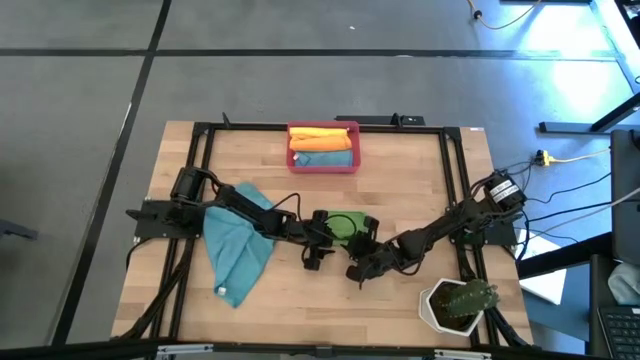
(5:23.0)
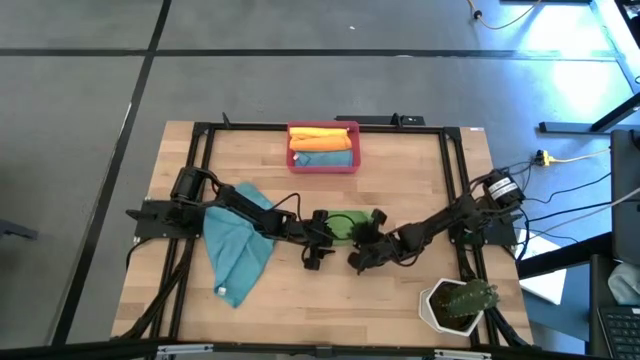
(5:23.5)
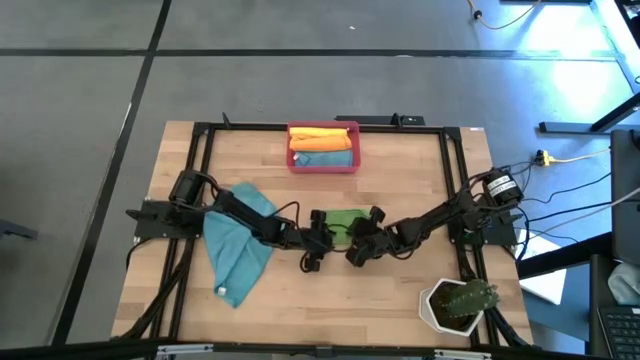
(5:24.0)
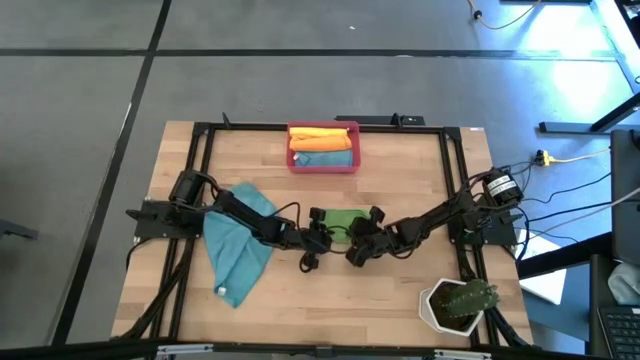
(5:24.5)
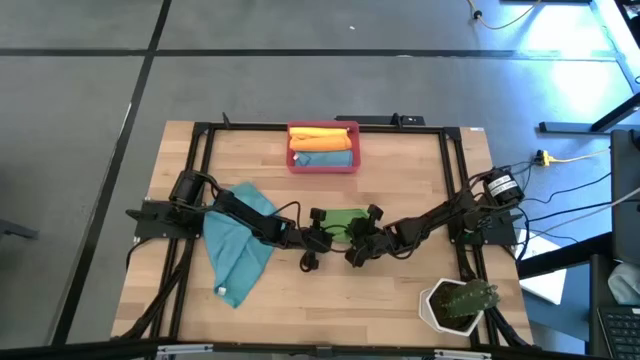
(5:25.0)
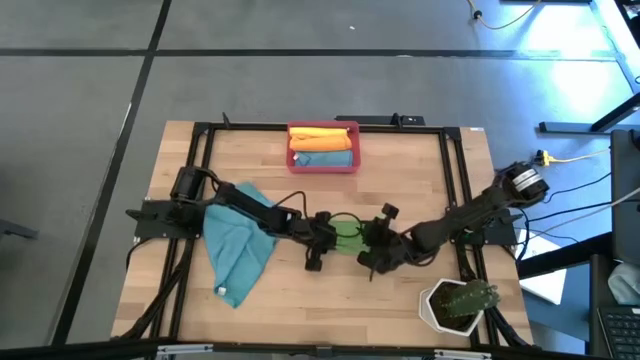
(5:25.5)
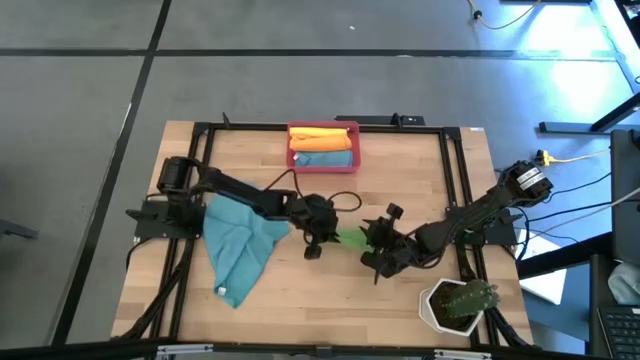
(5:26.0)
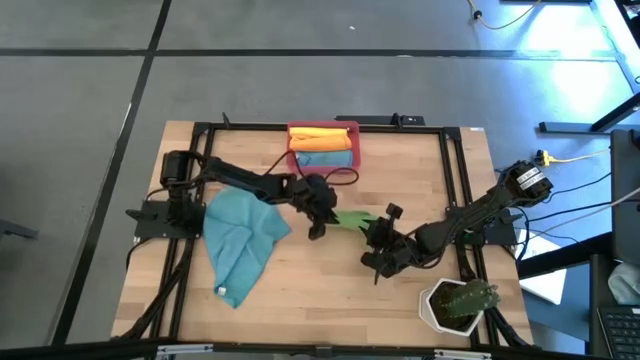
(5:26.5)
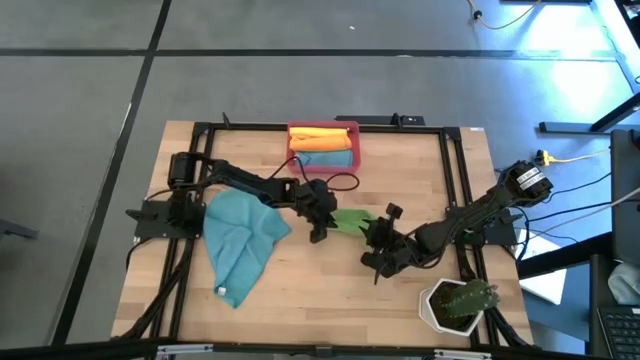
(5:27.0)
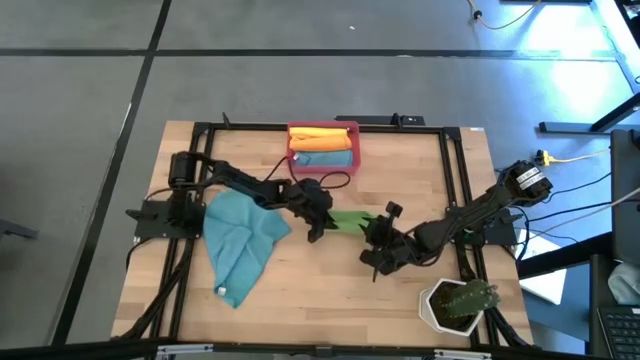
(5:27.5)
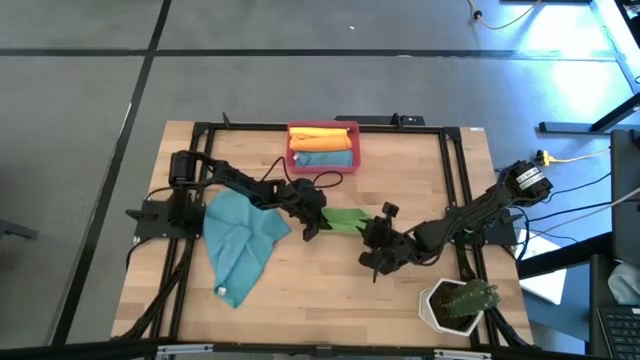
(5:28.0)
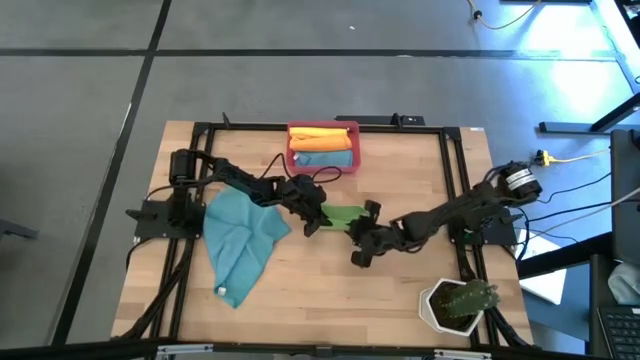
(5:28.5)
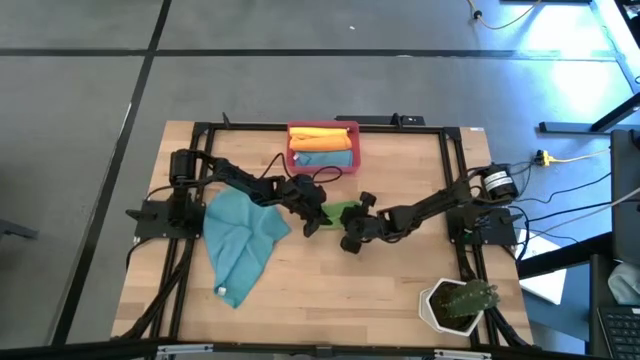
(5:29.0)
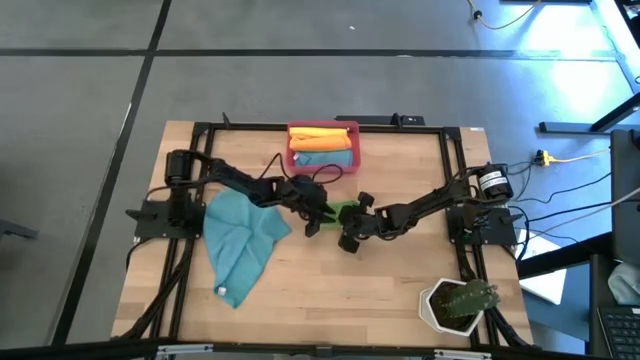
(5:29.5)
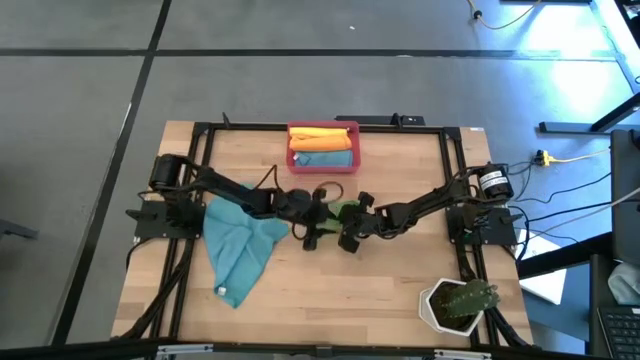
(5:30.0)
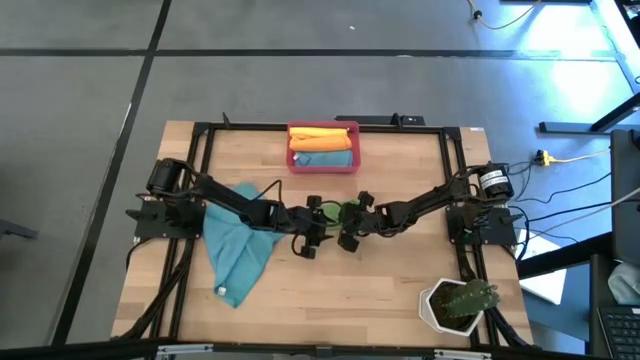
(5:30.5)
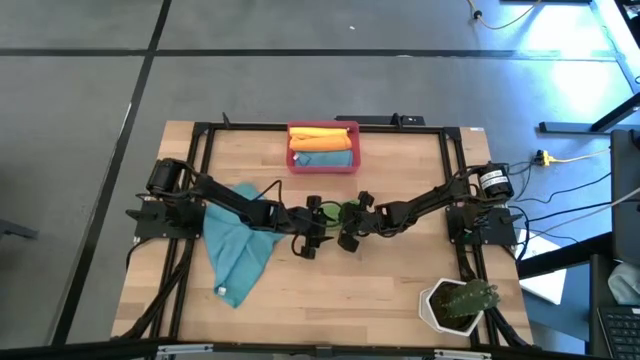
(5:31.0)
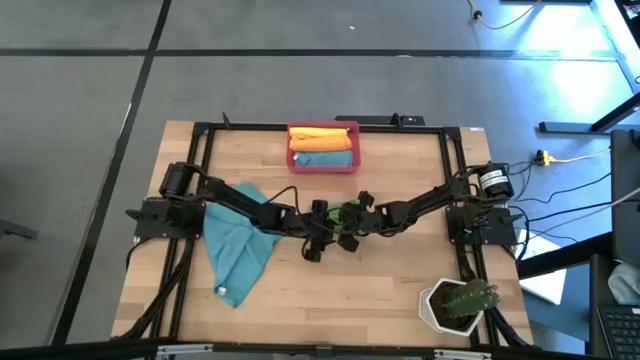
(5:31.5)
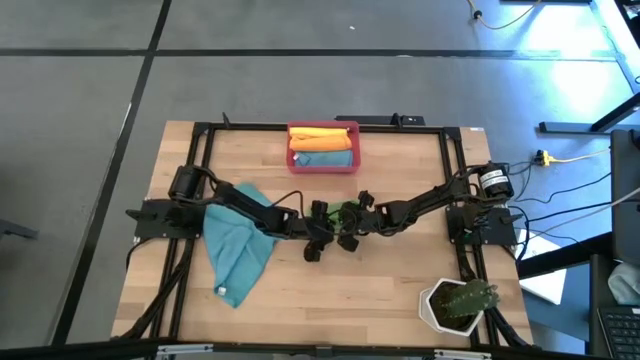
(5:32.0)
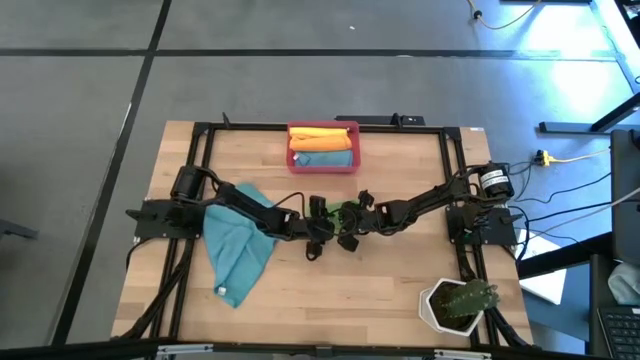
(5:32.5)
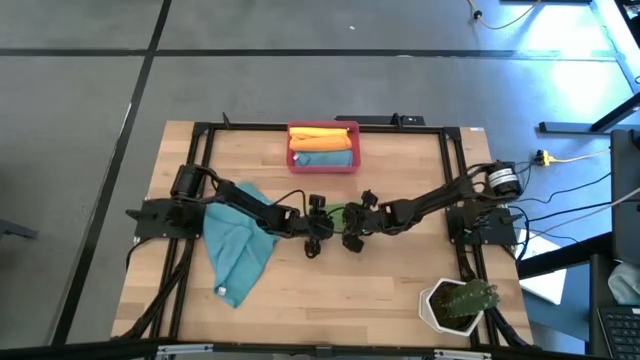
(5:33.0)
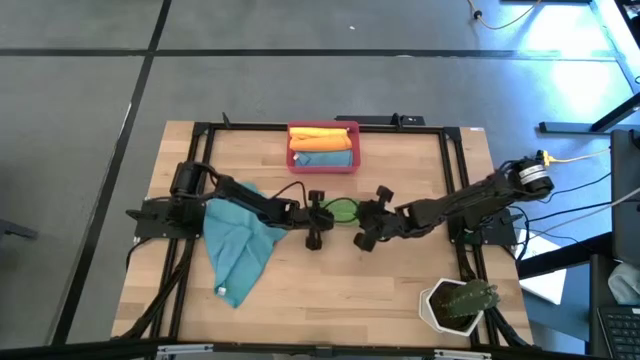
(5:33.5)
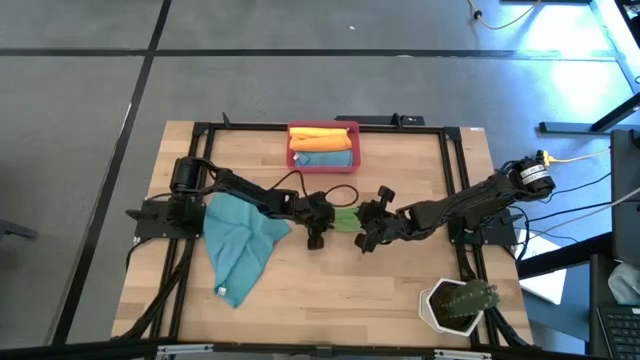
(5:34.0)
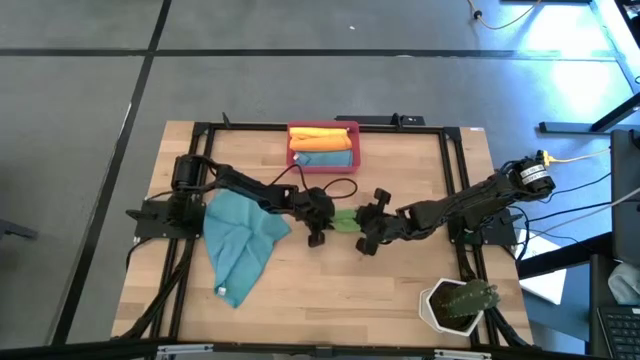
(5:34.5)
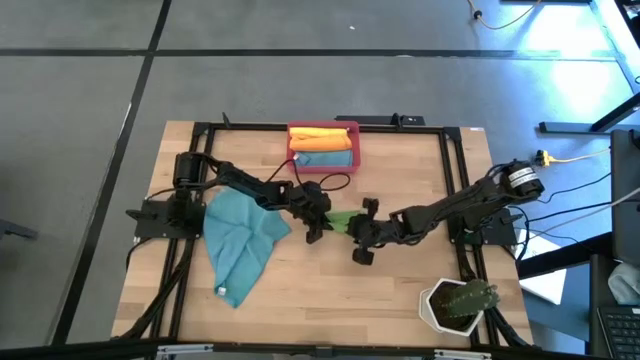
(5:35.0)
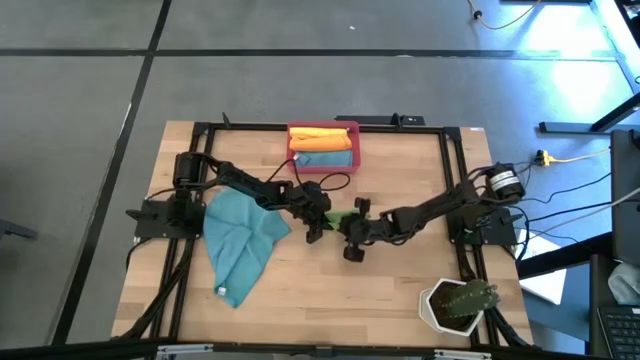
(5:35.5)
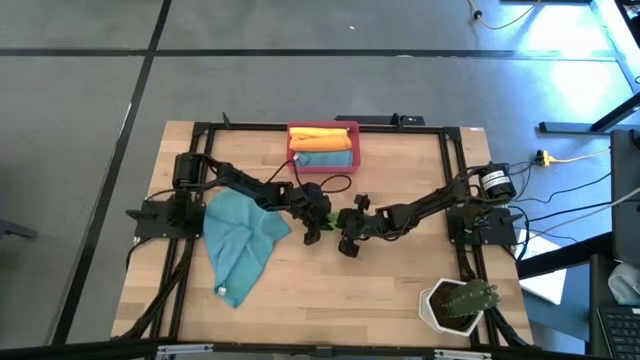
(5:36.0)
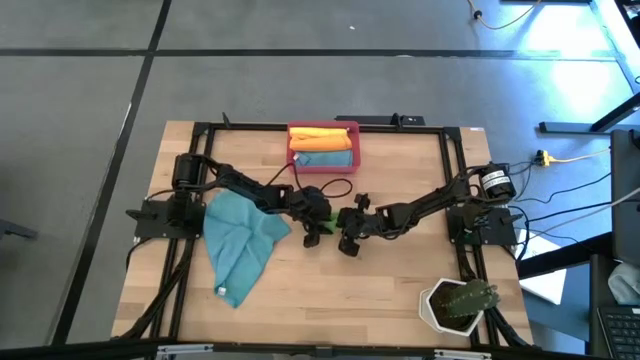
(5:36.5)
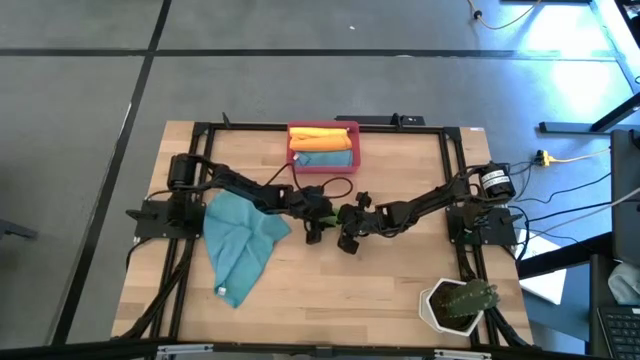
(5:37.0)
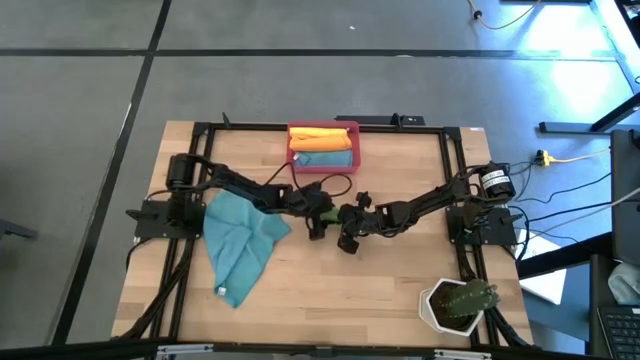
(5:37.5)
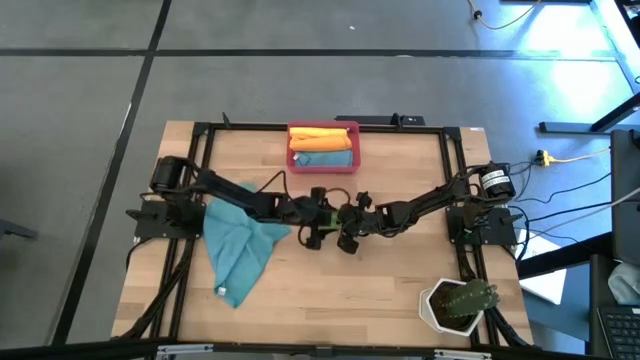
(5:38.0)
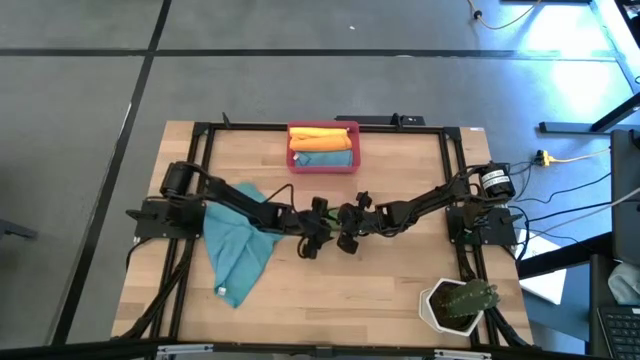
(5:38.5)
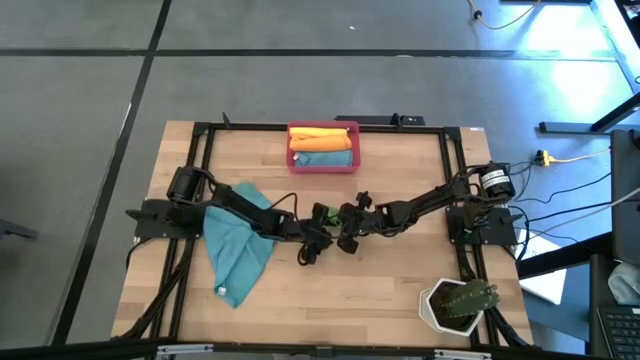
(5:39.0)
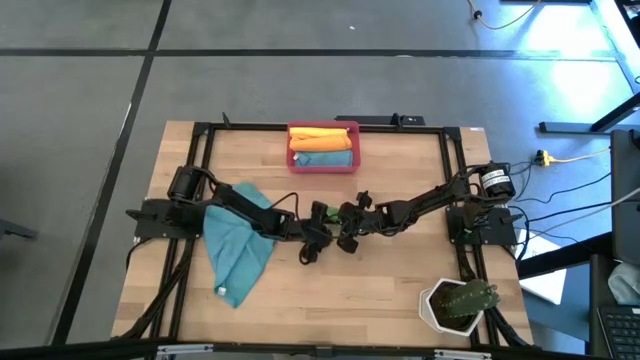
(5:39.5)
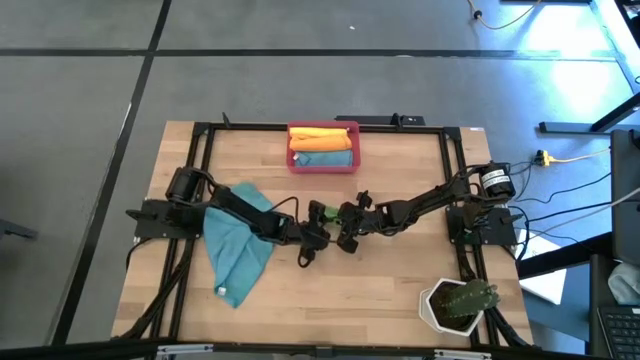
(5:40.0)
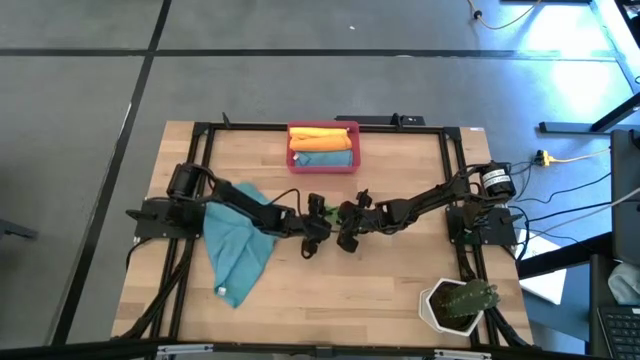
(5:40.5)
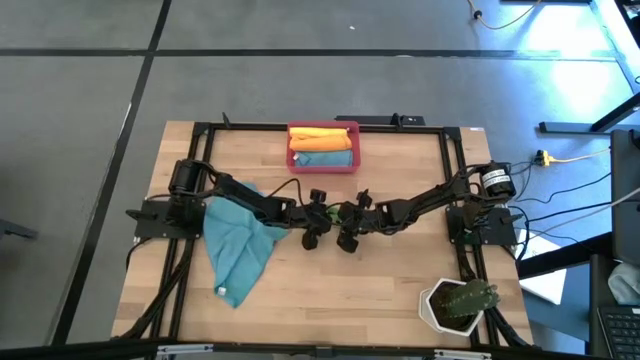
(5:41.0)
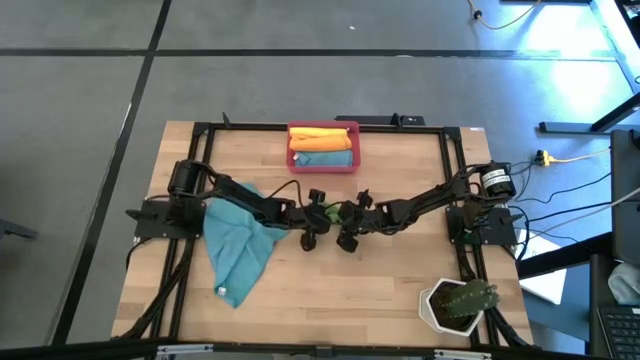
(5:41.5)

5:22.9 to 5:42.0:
Task: Roll microfiber towels into tight, uniform cylinder then place into a basket
Roll the green microfiber towel

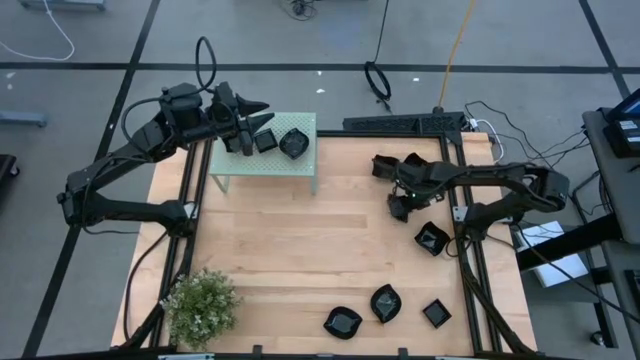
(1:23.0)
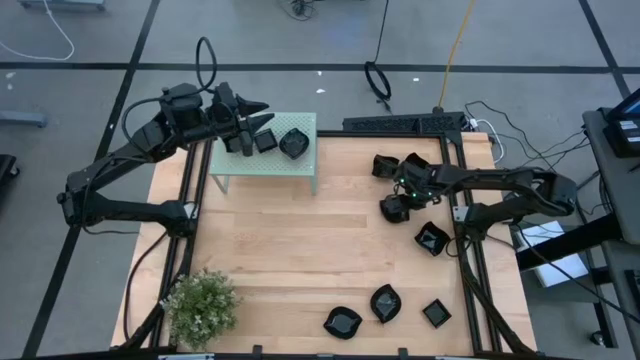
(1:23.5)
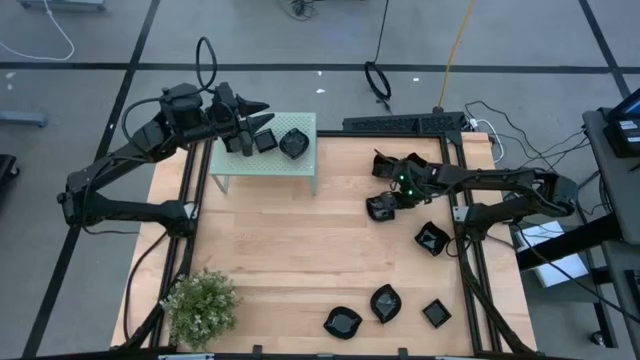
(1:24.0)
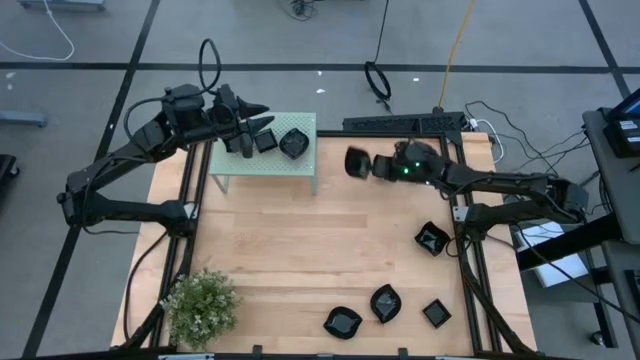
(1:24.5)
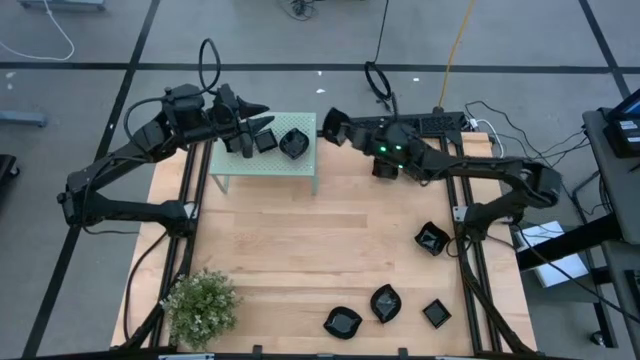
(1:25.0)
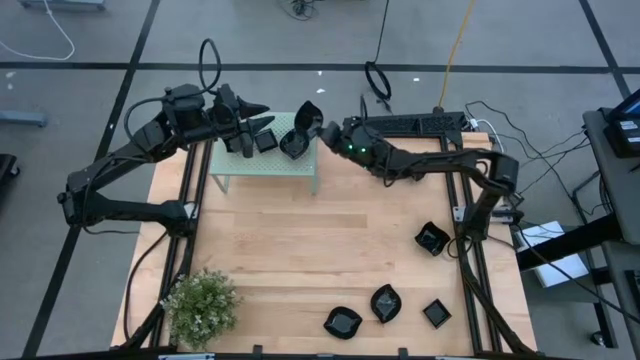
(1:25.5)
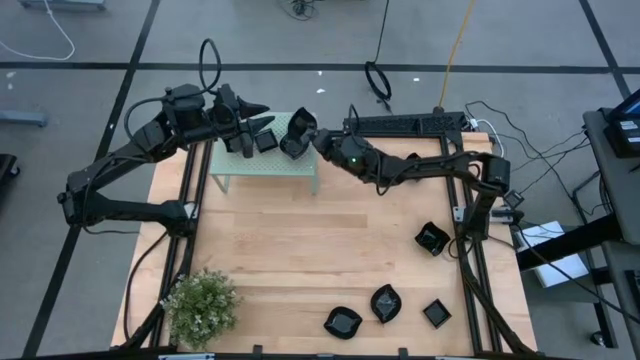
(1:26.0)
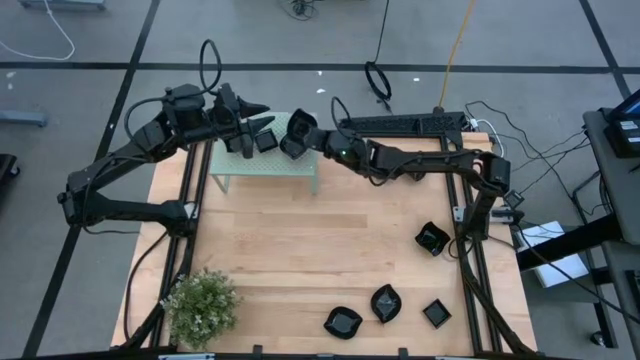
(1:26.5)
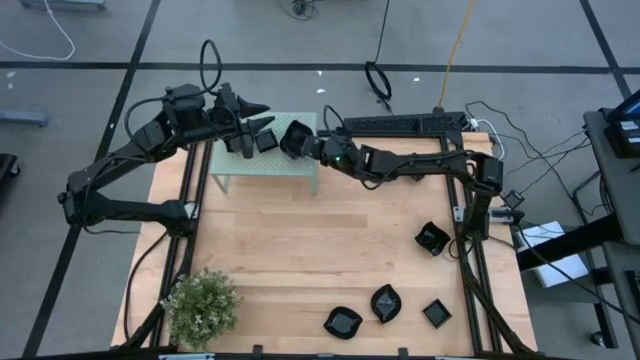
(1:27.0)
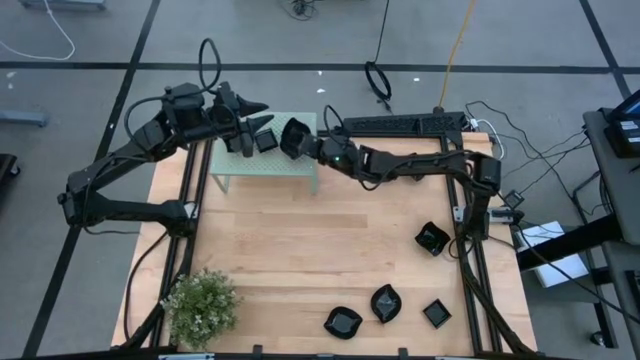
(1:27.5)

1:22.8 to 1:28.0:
Task: Pick & Place Mini shaped plates
Stack the top leaf shaped plate on top of the leaf shaped plate on the shelf
